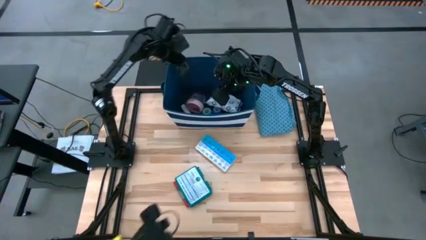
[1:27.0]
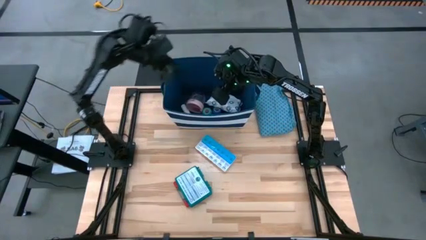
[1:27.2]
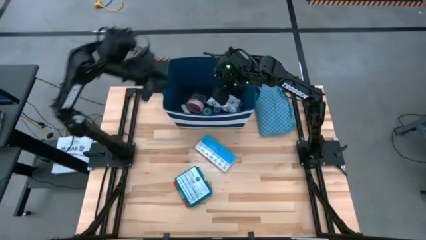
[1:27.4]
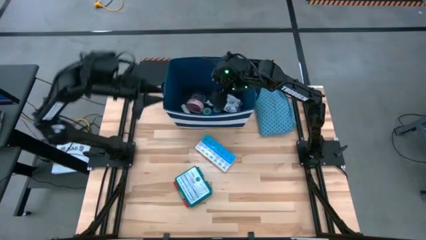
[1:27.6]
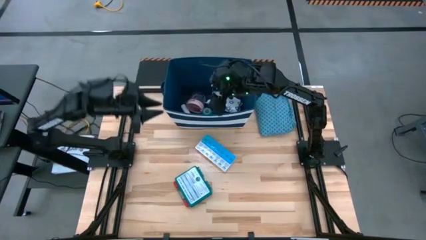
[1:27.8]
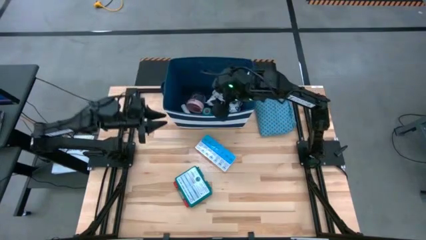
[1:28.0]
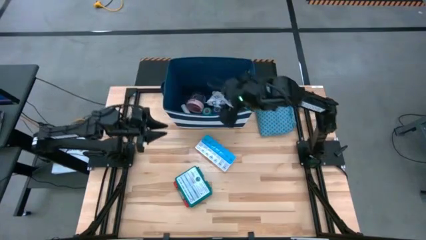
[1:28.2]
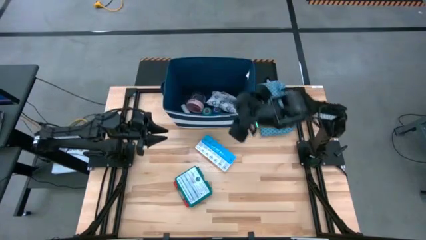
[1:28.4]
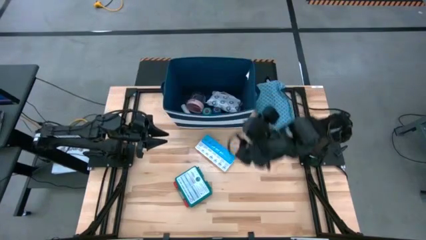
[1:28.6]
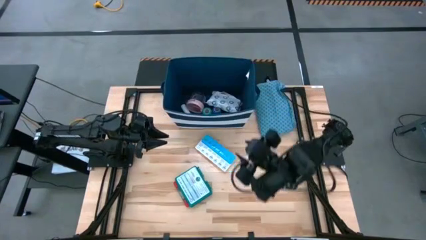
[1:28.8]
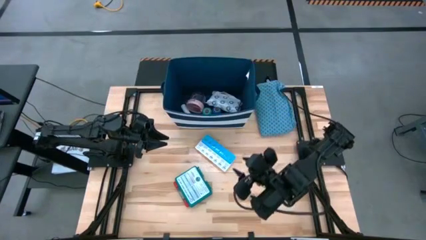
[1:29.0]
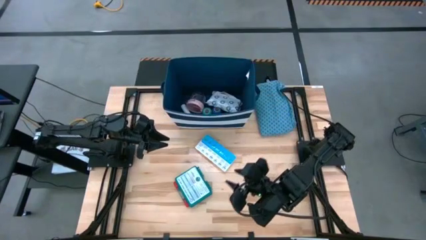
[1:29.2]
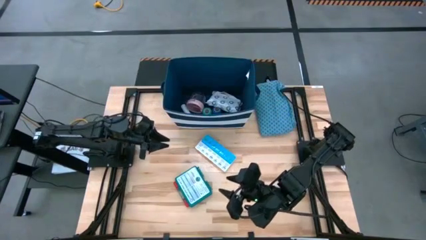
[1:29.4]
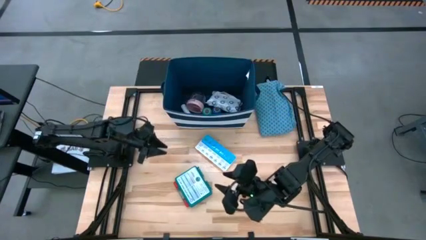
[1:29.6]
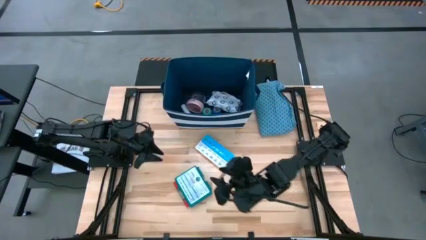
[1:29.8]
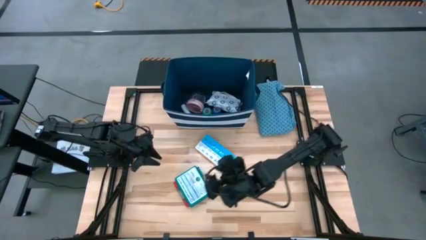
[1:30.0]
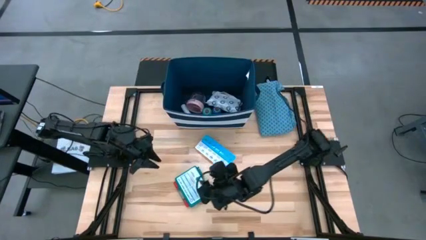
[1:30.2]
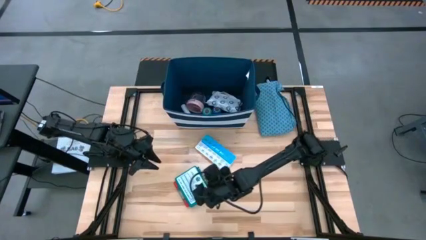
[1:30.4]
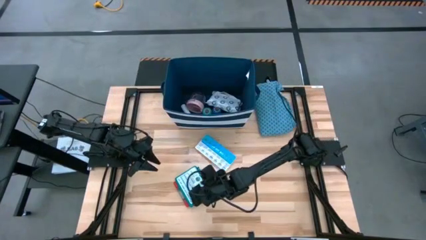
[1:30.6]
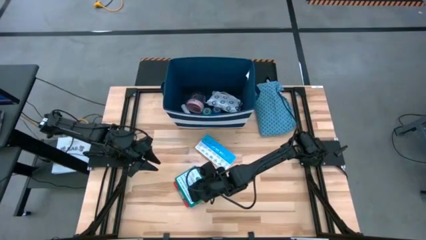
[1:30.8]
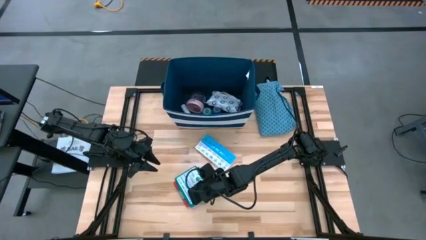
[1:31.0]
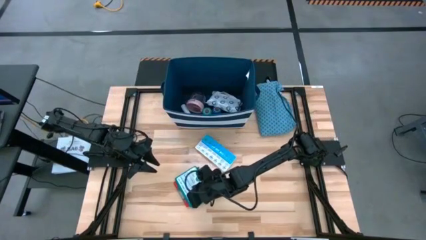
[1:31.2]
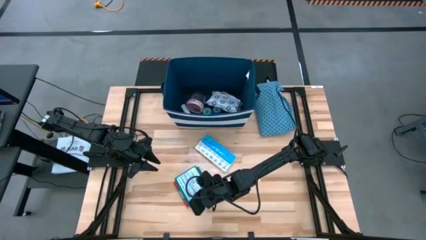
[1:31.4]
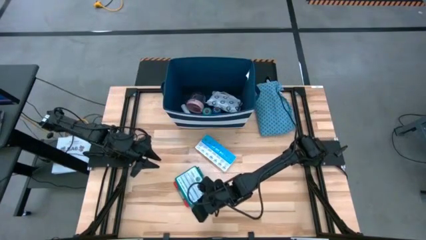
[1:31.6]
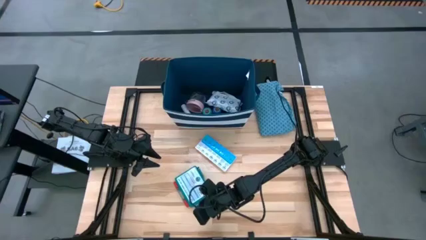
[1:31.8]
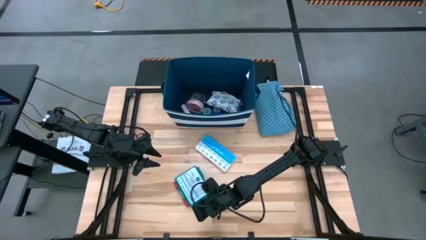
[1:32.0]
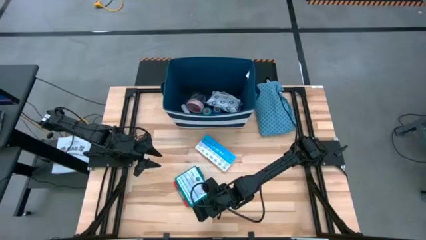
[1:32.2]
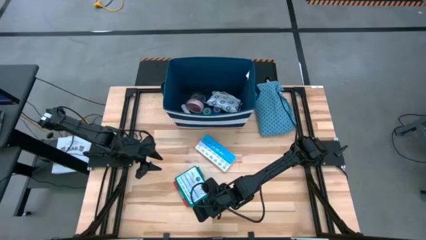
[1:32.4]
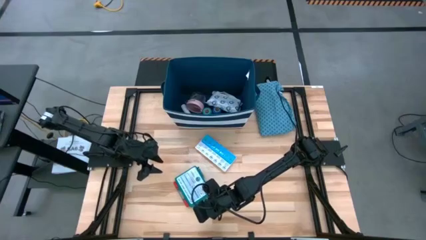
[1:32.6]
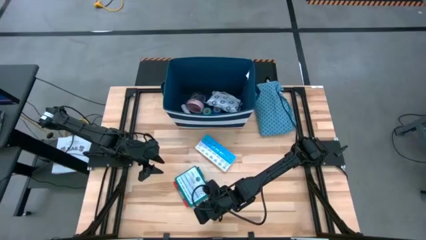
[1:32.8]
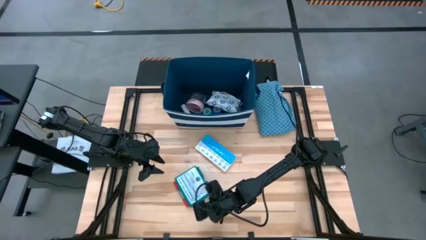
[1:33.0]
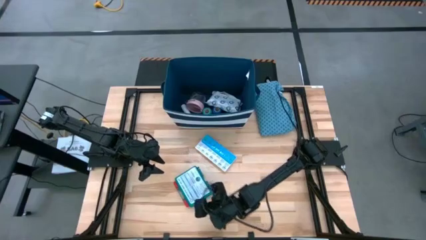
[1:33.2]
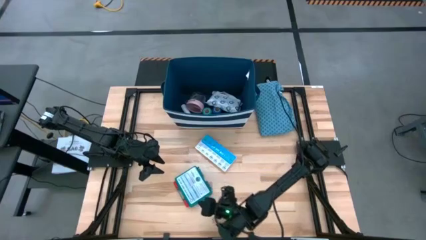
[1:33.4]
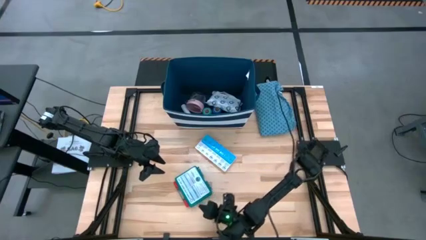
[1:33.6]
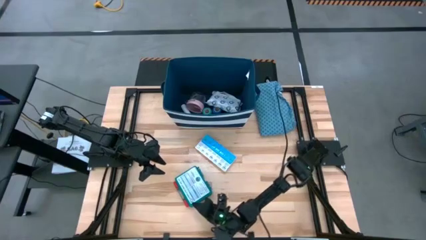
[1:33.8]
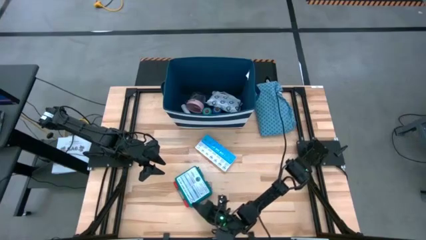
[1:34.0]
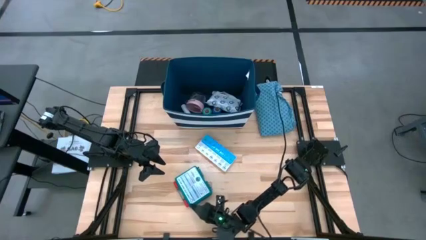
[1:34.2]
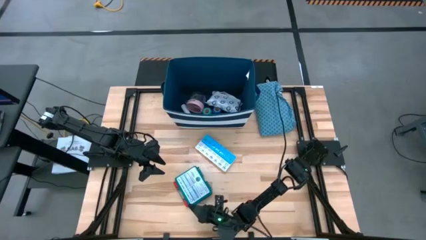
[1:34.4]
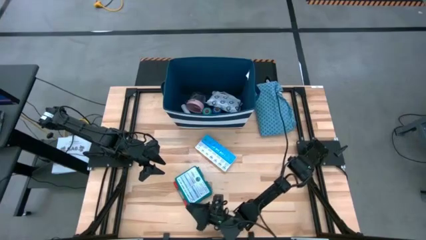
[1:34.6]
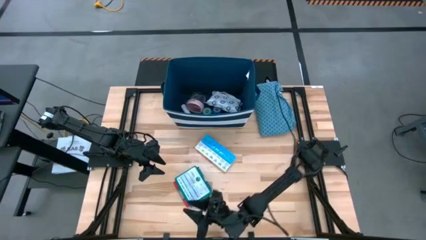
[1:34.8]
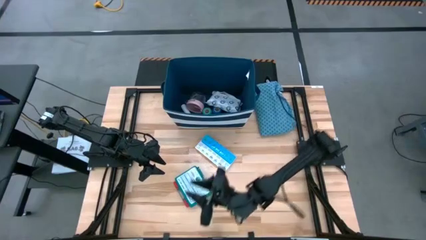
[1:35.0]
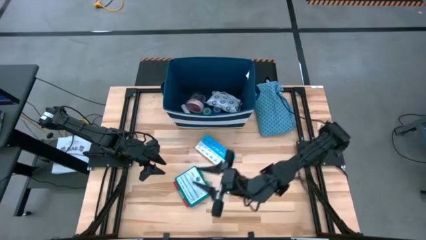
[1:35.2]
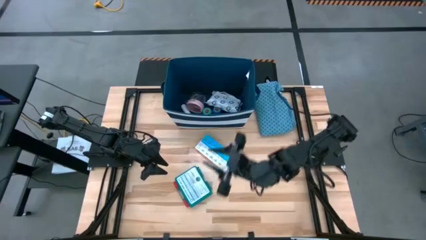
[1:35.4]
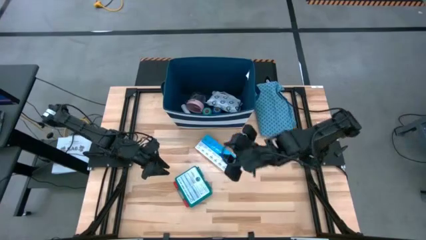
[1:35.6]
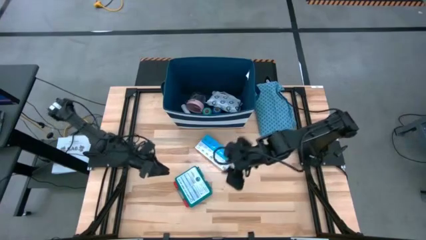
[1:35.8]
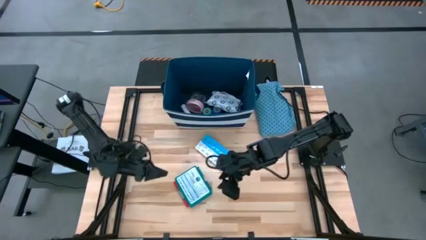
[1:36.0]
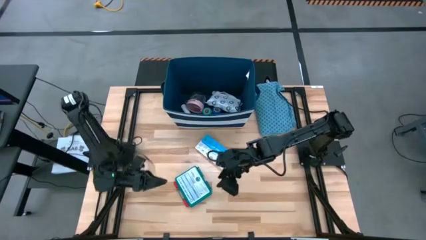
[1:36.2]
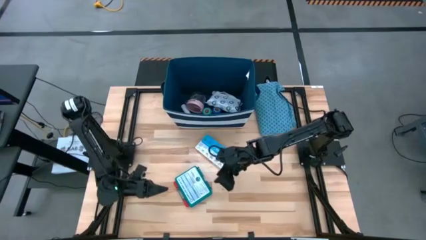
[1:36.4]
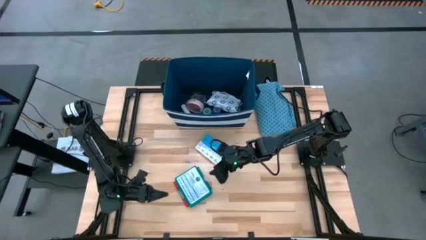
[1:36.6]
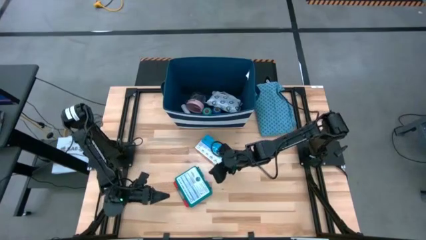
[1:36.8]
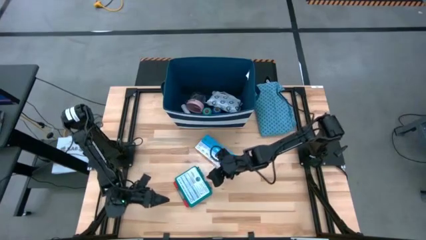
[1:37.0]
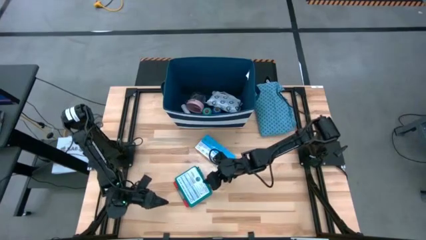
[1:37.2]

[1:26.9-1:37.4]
Task: Pick & place medical supplies in basket/bin
Put the green emergency kit into the bin
